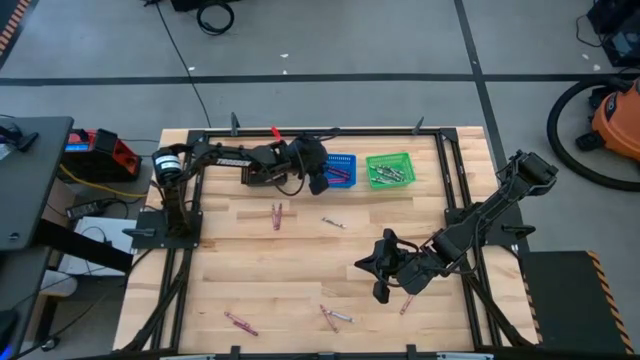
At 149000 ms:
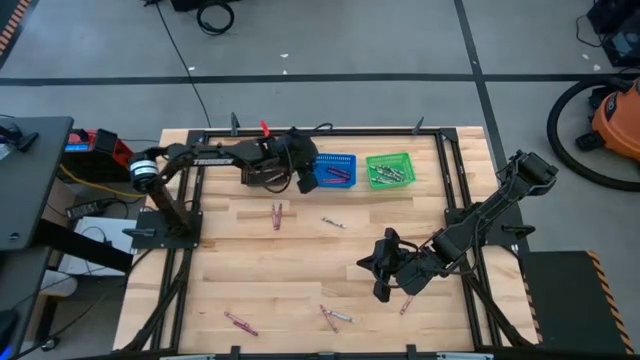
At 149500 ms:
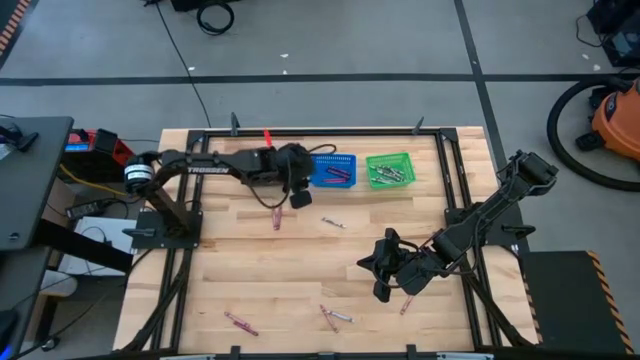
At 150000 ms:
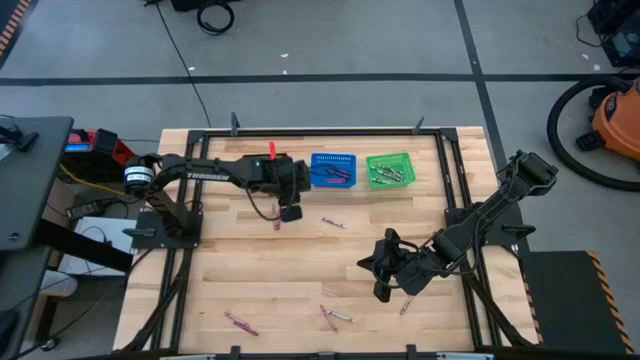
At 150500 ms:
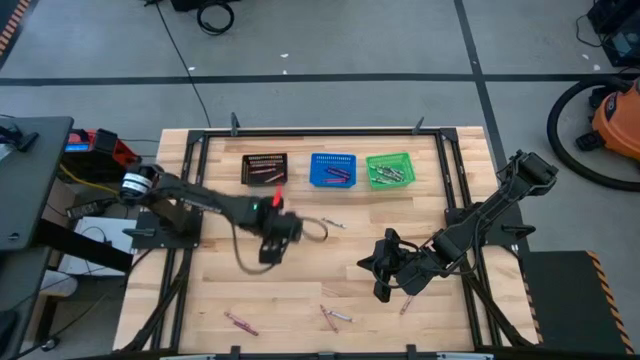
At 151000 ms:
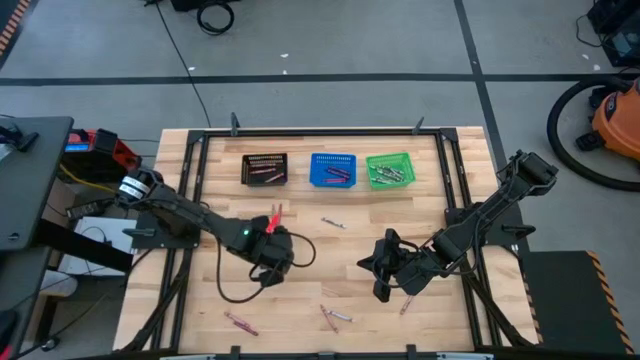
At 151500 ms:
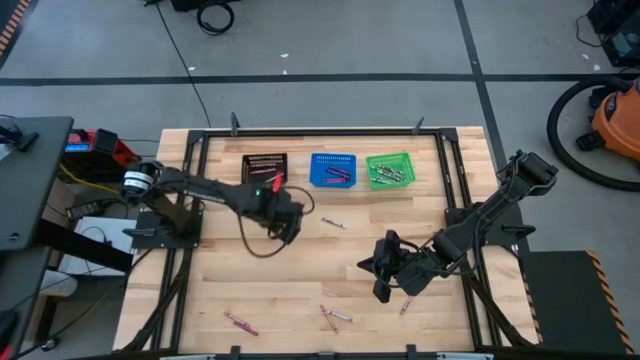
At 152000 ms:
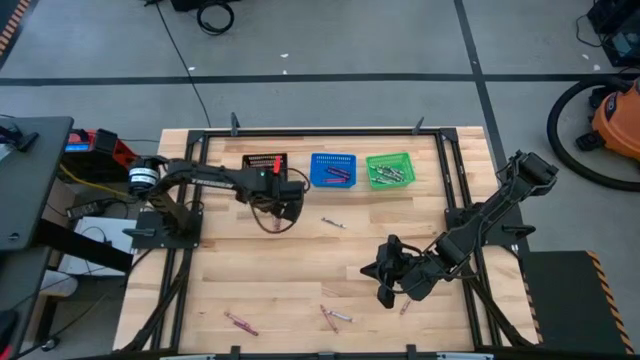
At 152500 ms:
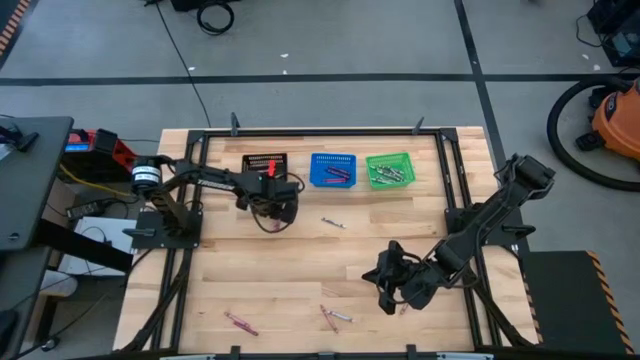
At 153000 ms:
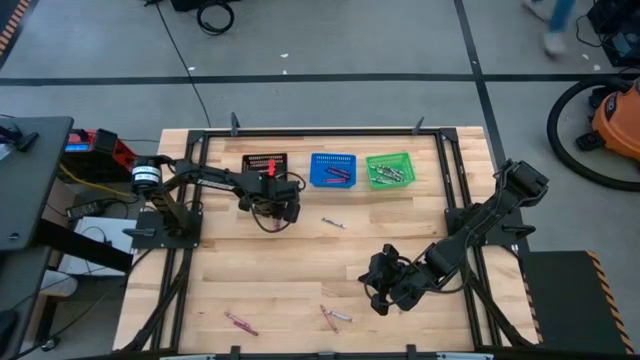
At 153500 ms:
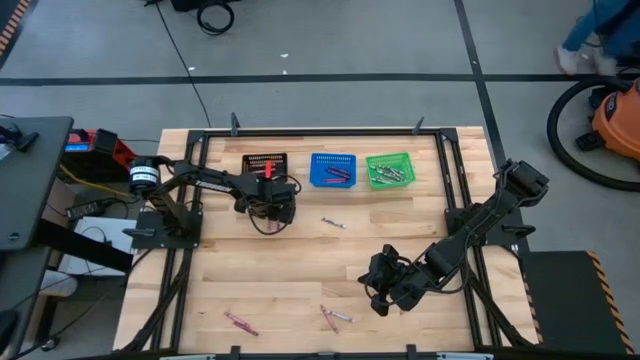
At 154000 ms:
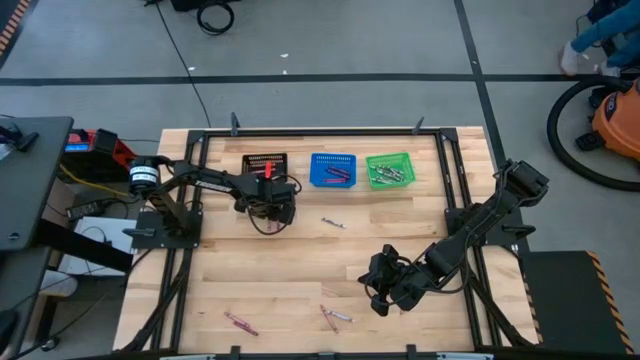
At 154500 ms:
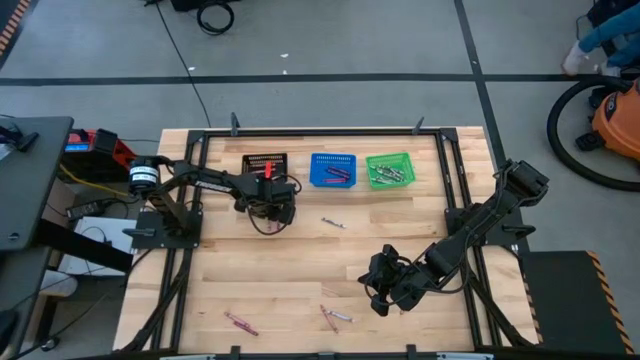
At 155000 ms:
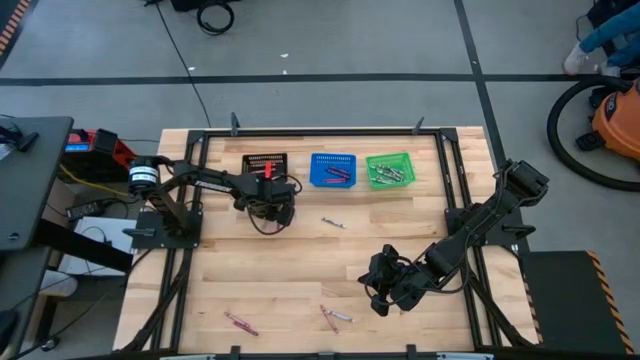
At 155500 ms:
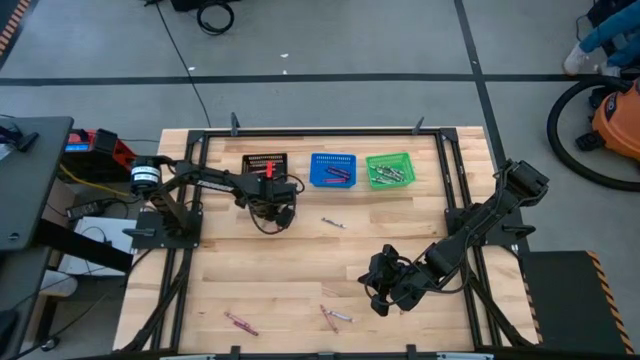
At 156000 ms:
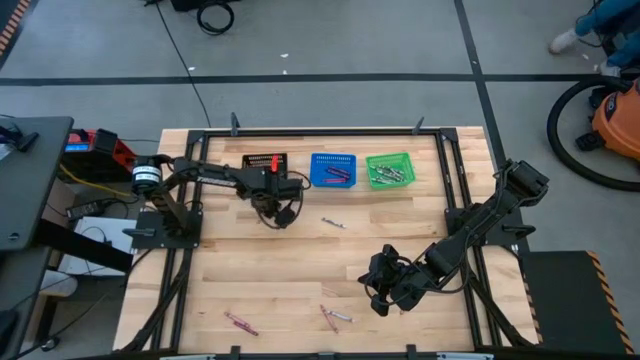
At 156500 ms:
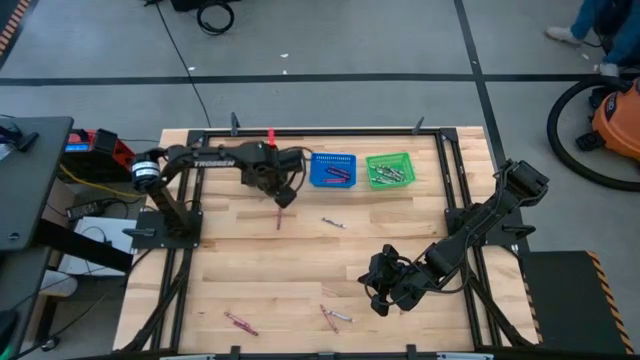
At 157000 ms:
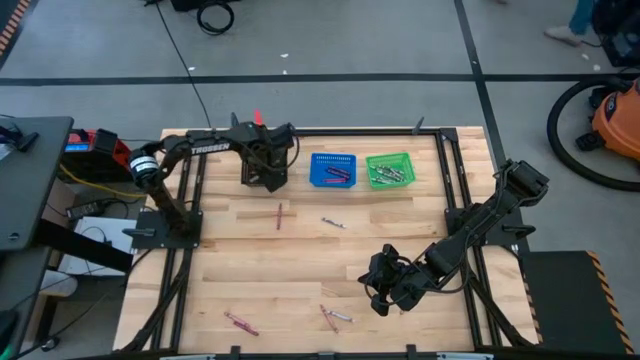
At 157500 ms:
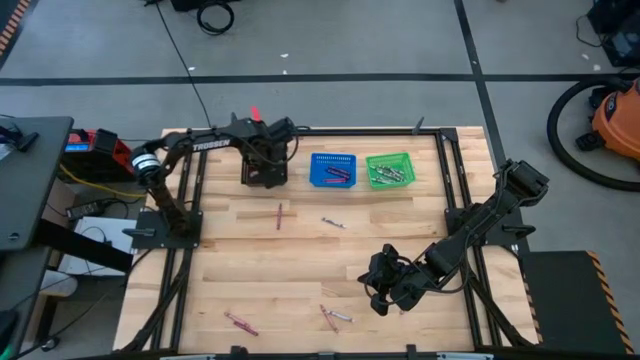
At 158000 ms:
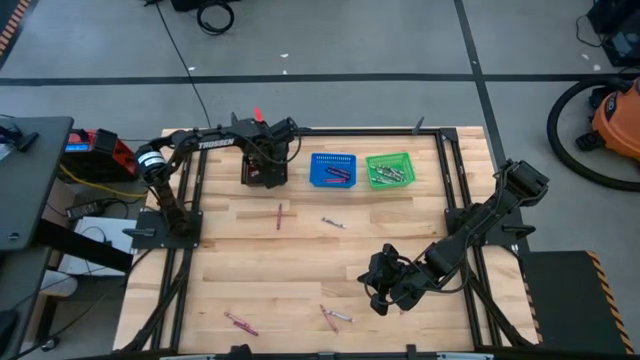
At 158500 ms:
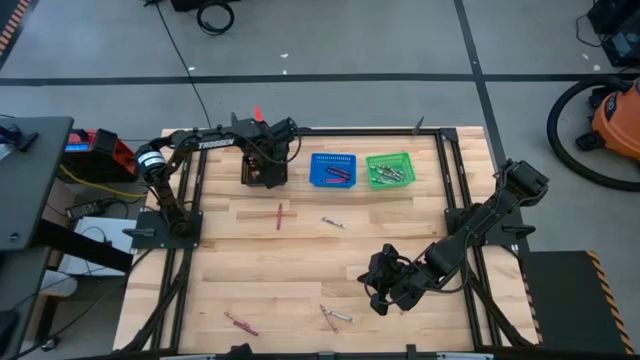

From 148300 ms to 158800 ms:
Task: Sort crayons
Put the pink crayon into the black bin

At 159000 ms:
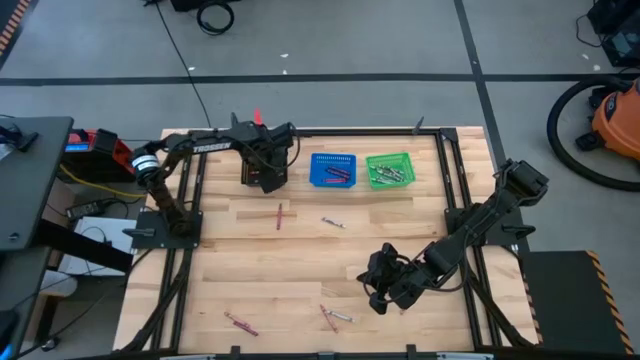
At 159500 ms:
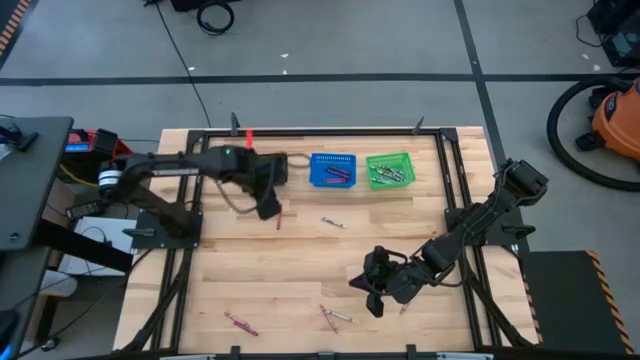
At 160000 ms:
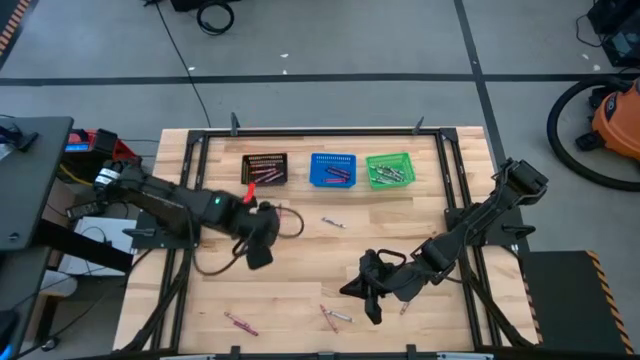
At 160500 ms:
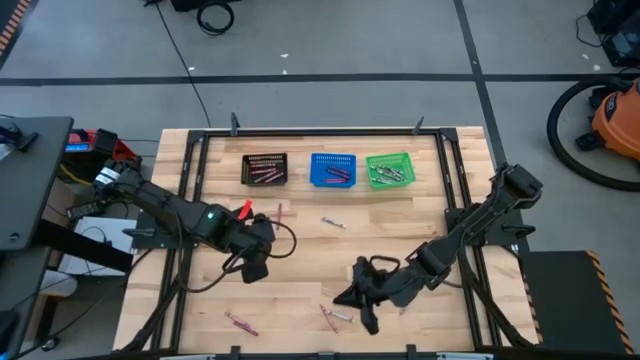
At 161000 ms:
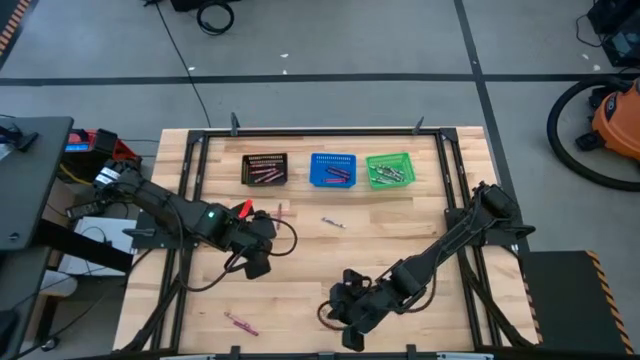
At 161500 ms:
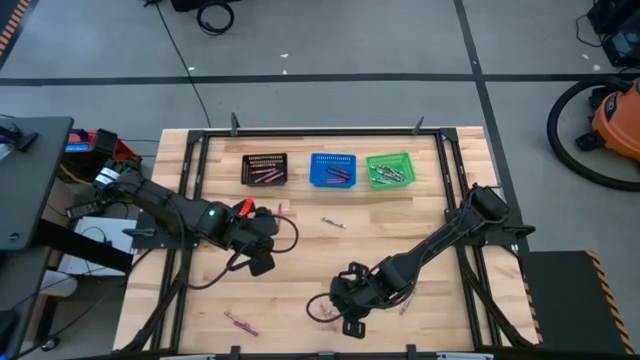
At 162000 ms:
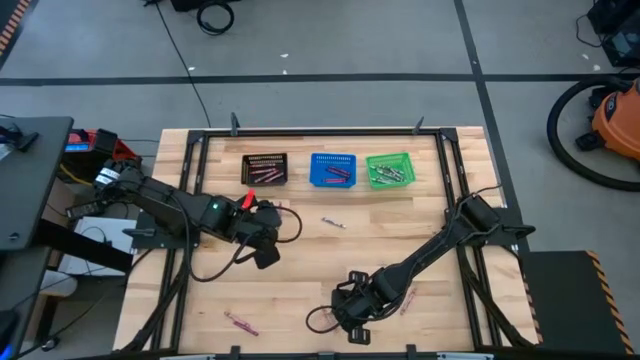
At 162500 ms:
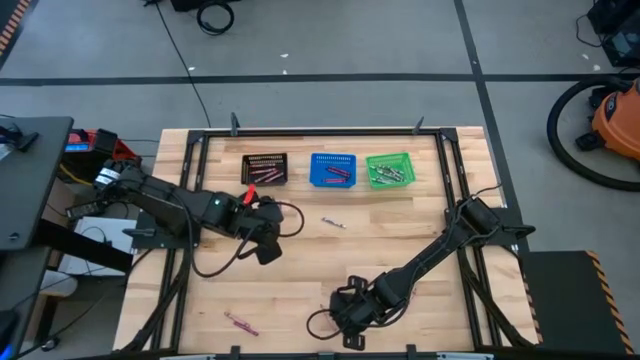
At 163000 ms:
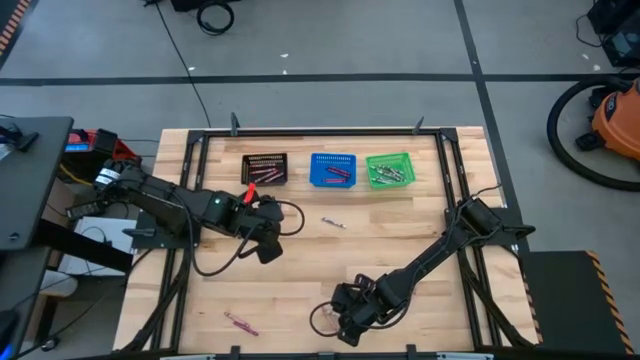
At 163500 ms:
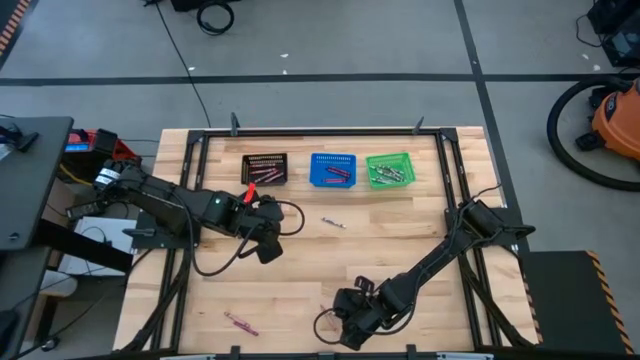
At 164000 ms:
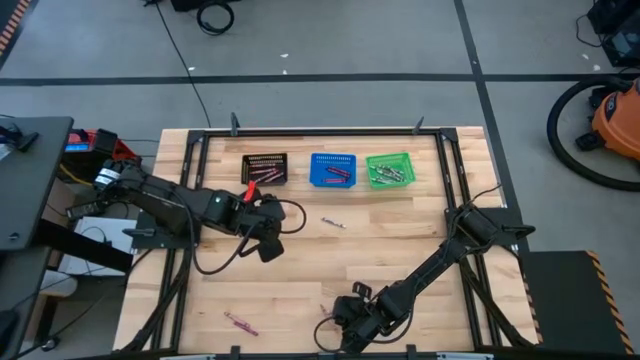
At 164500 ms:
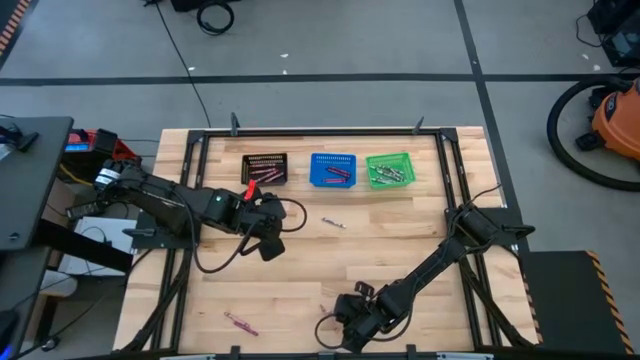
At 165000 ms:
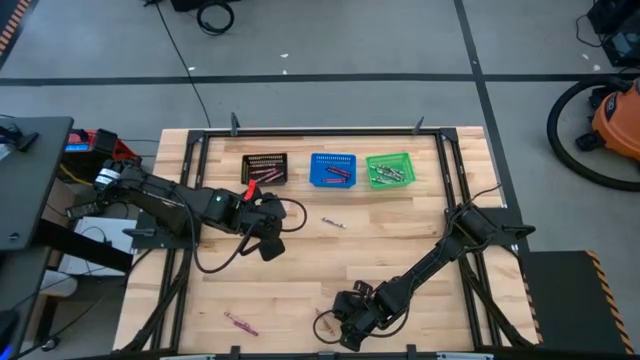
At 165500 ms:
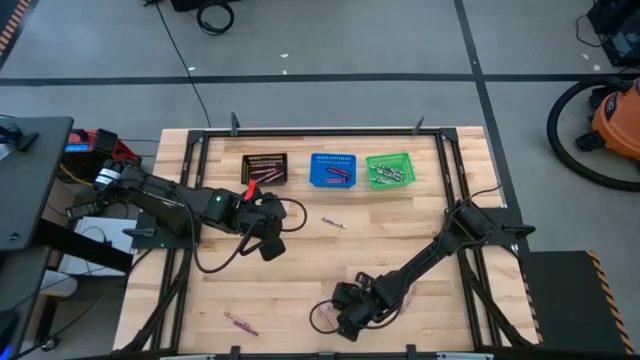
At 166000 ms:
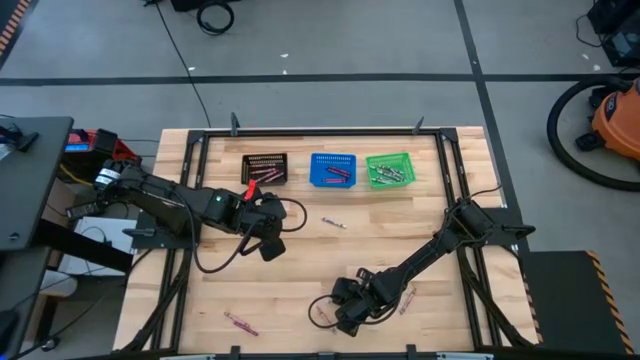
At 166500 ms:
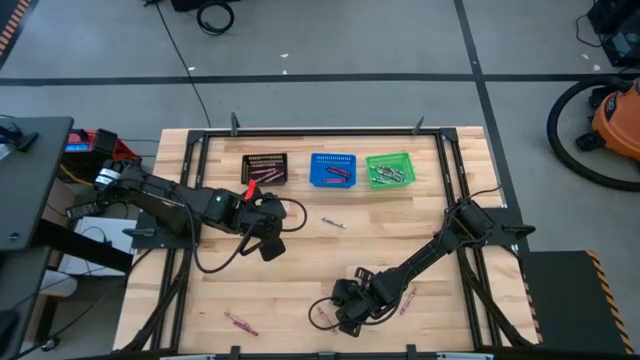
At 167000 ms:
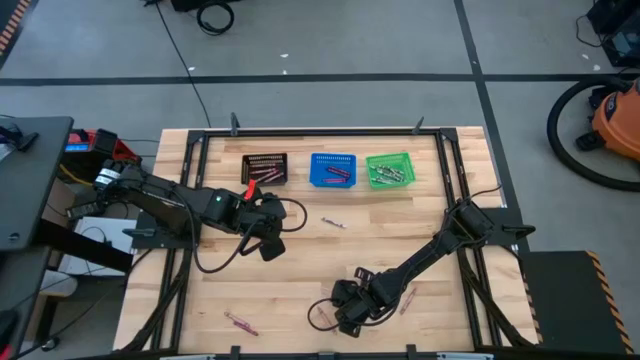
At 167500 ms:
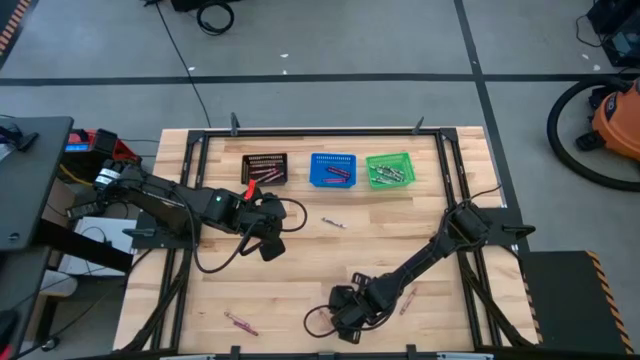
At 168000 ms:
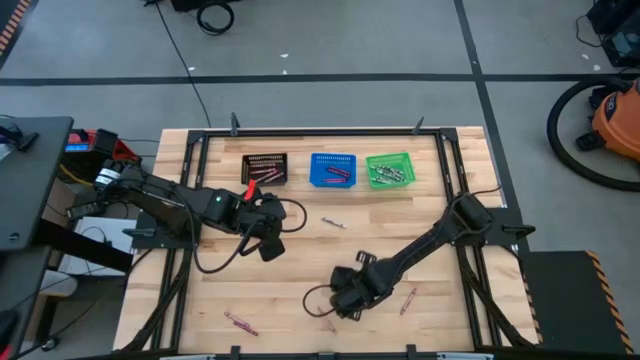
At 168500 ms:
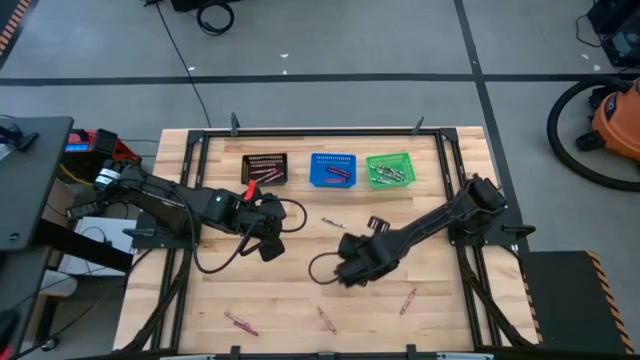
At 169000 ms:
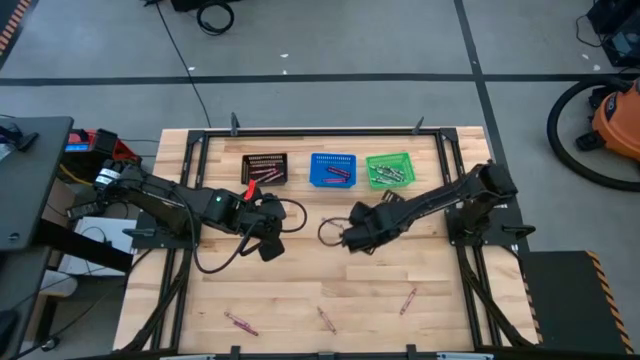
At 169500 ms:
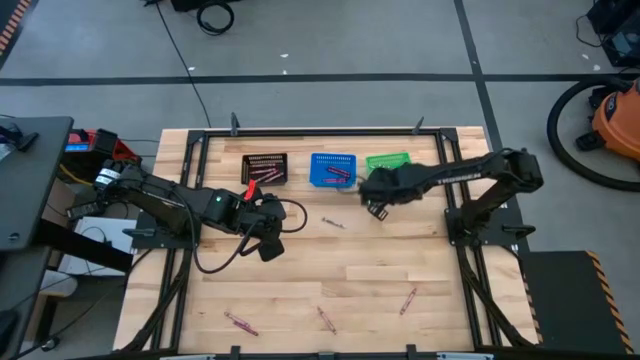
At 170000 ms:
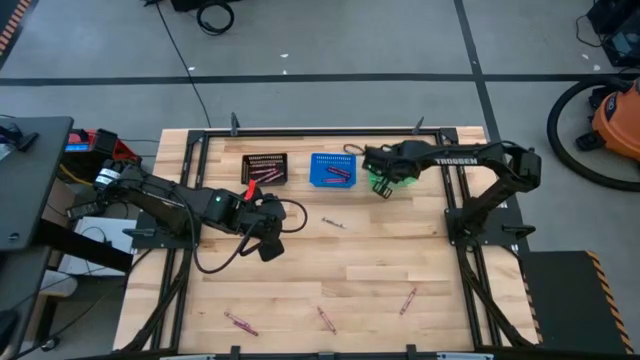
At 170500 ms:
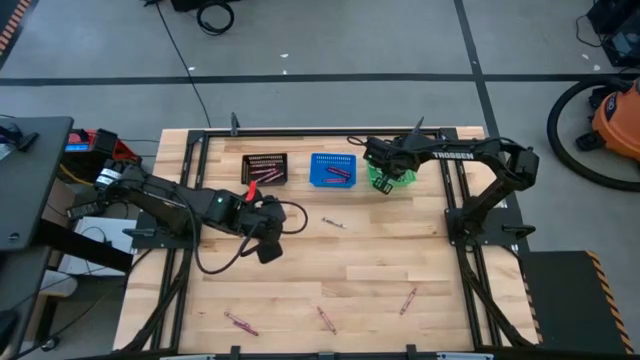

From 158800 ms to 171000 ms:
Put the white crayon into the green bin
